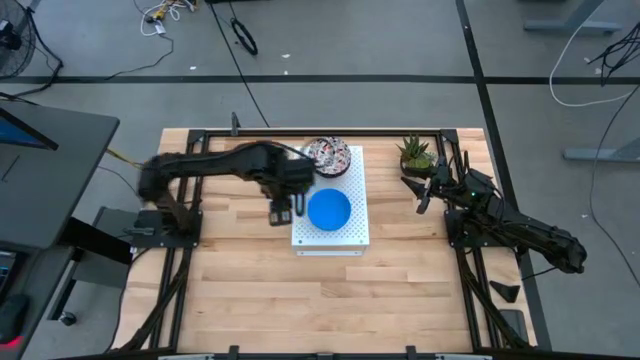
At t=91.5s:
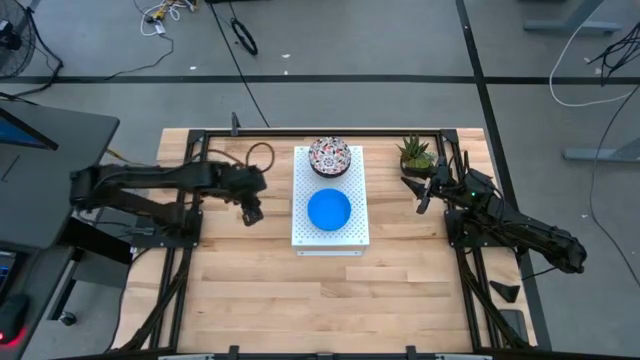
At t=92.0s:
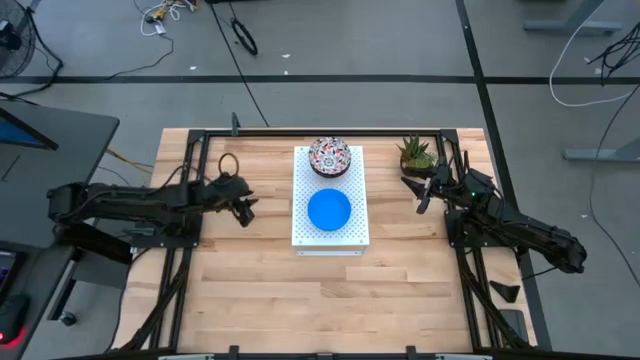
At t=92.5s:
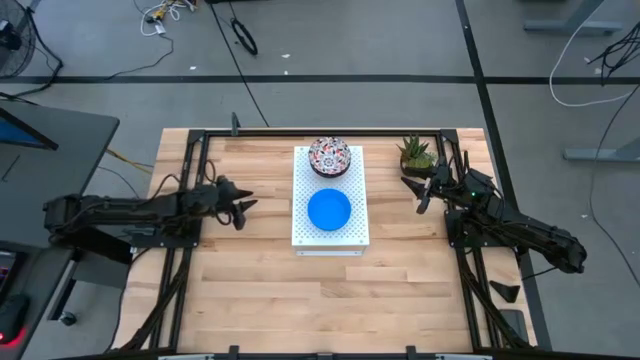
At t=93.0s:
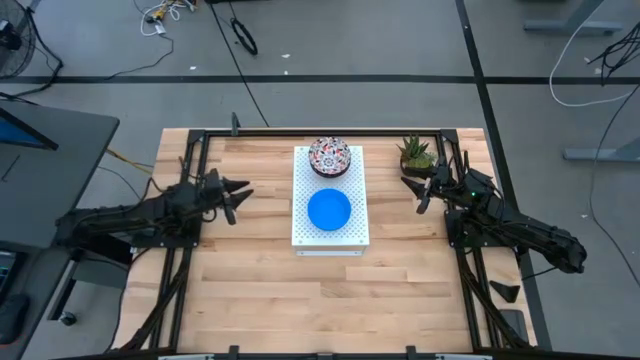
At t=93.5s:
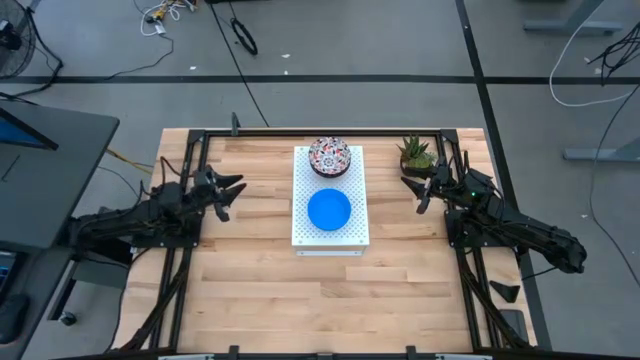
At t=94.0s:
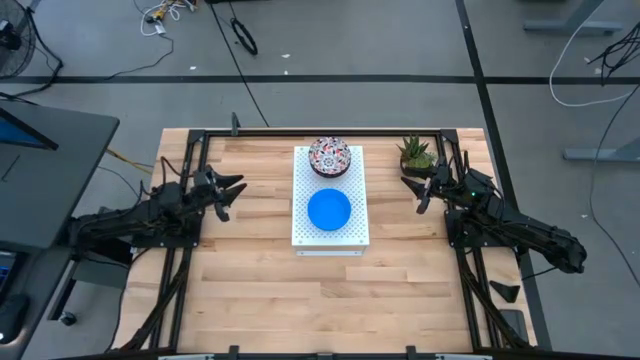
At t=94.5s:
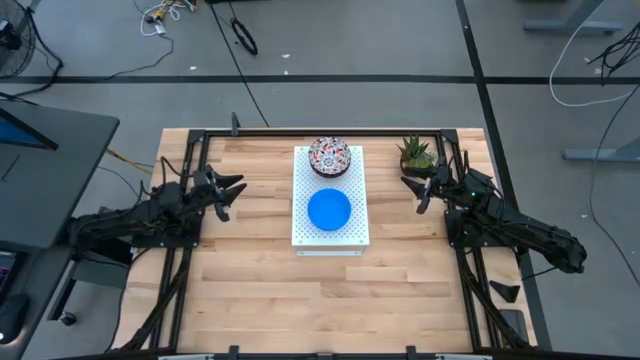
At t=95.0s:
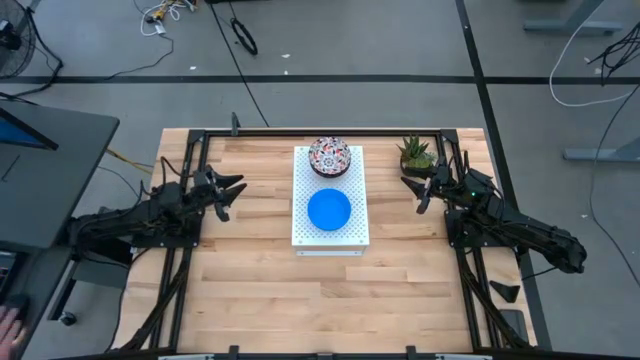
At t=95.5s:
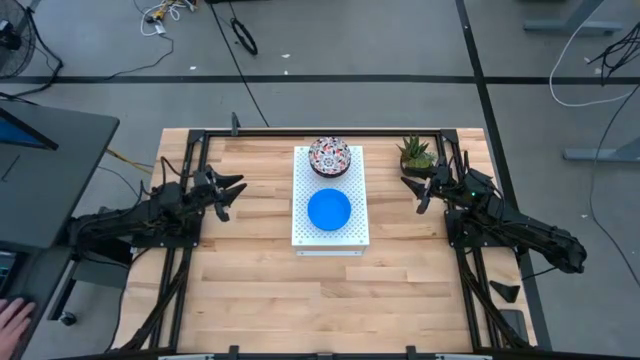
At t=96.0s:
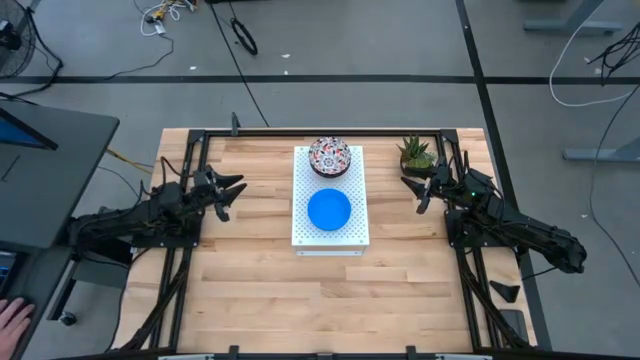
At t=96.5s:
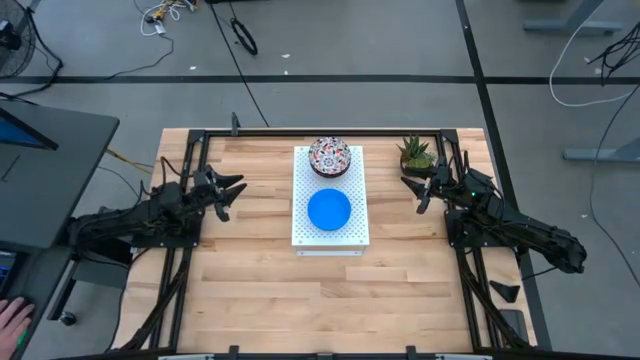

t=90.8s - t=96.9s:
Task: Pick & Place Mini bowls
Return to Home Position

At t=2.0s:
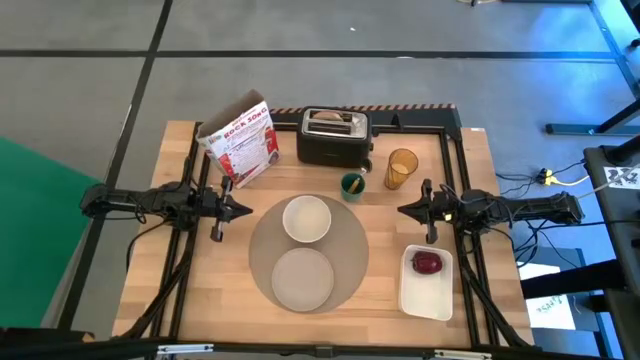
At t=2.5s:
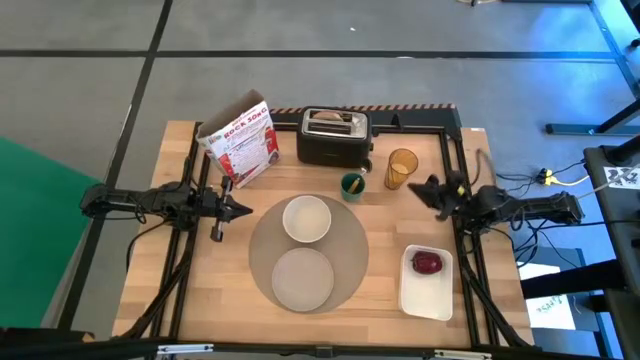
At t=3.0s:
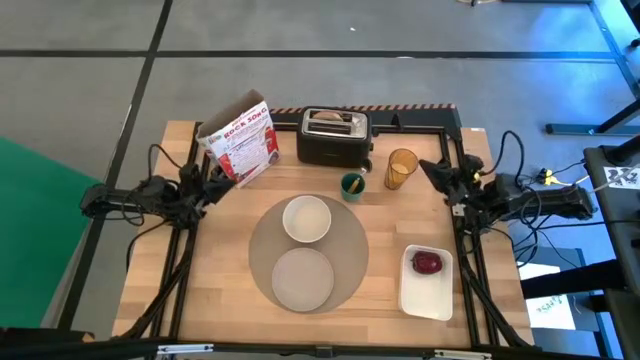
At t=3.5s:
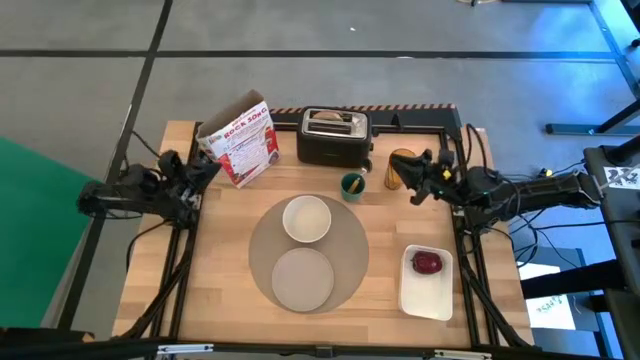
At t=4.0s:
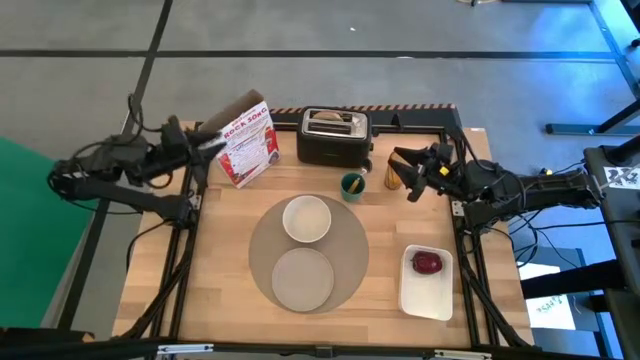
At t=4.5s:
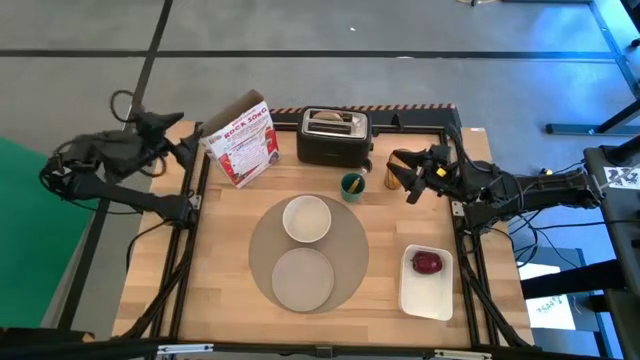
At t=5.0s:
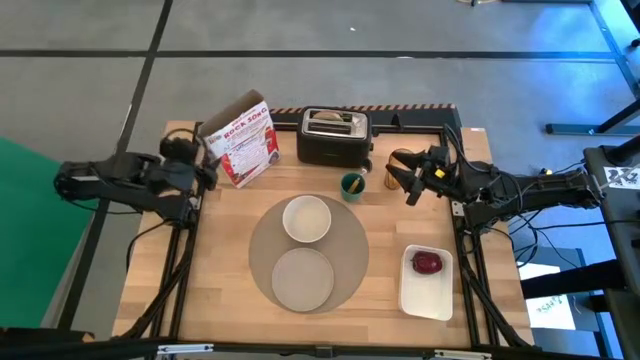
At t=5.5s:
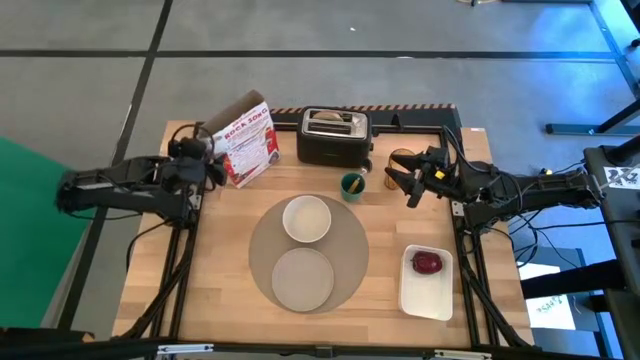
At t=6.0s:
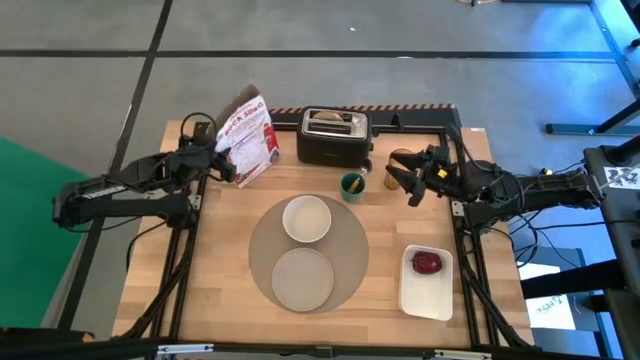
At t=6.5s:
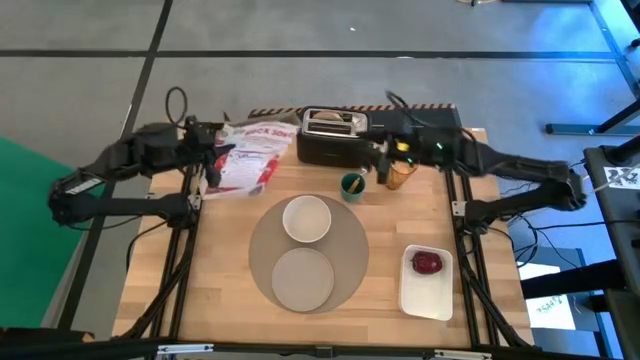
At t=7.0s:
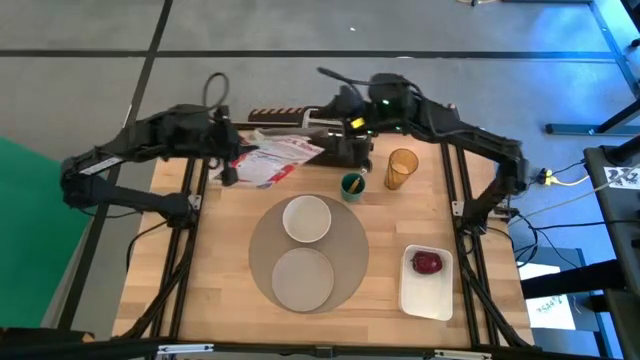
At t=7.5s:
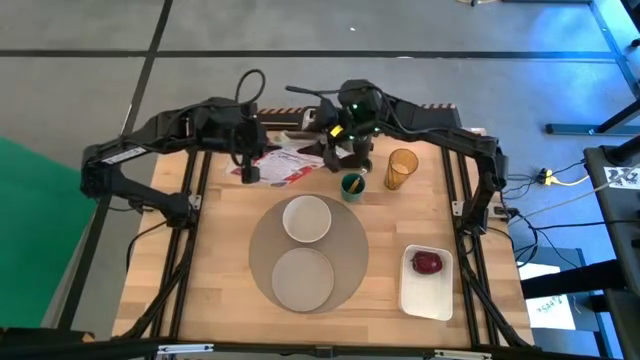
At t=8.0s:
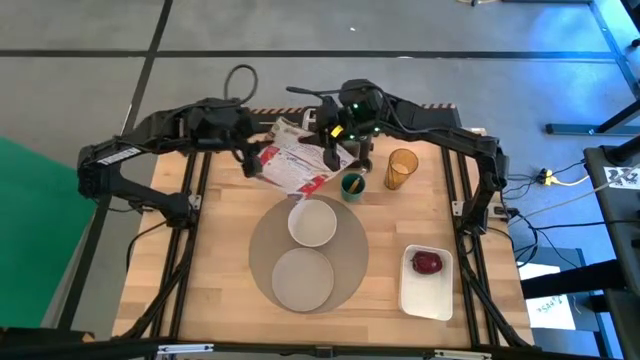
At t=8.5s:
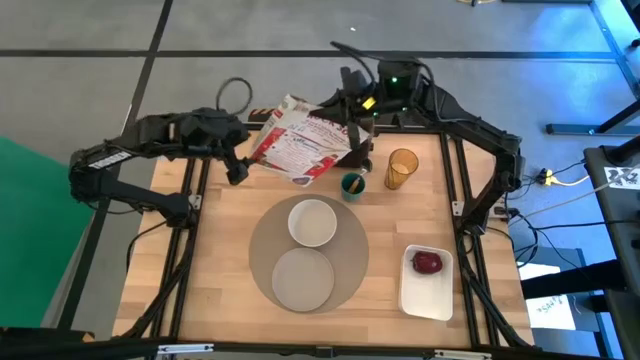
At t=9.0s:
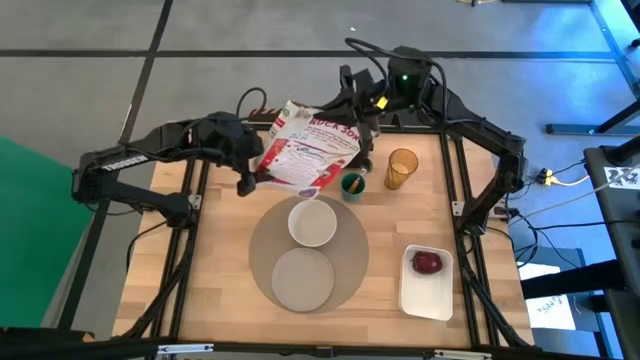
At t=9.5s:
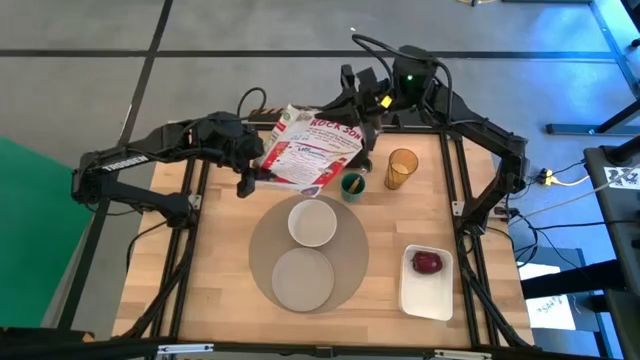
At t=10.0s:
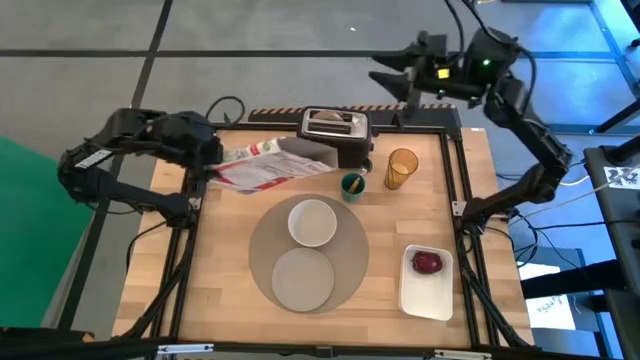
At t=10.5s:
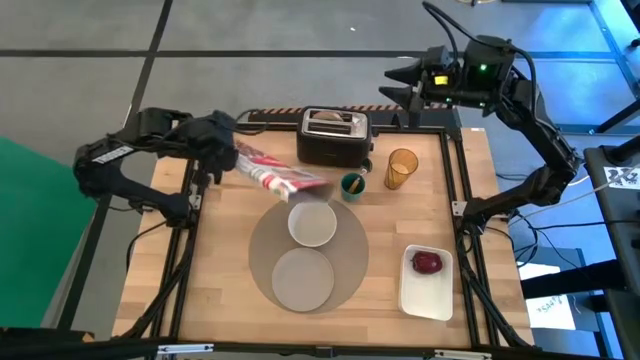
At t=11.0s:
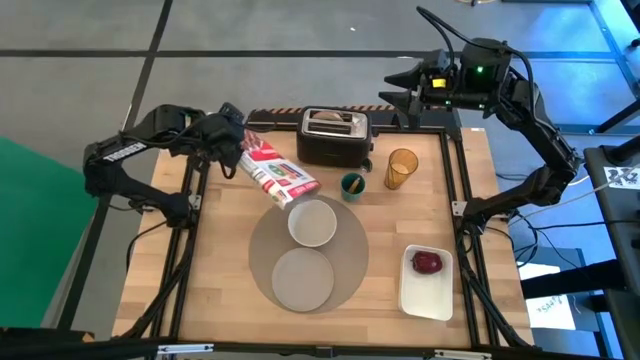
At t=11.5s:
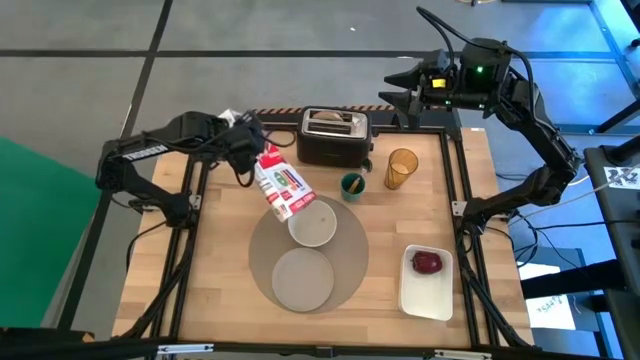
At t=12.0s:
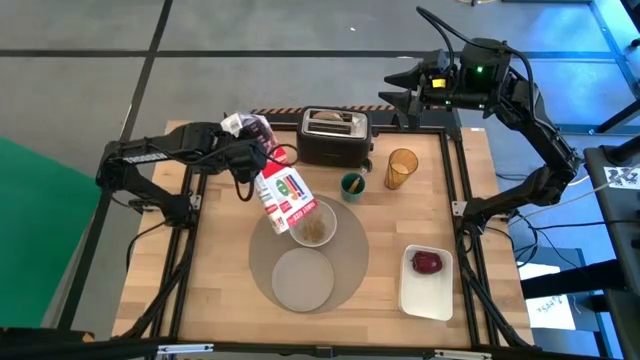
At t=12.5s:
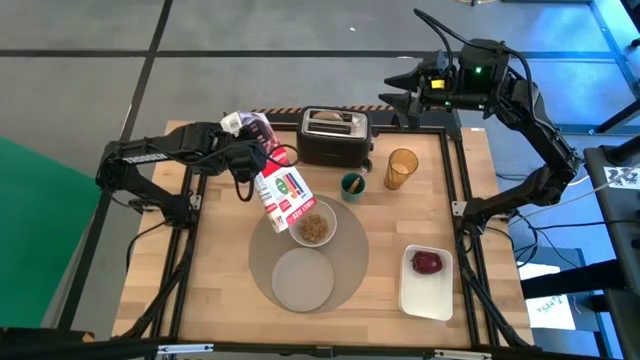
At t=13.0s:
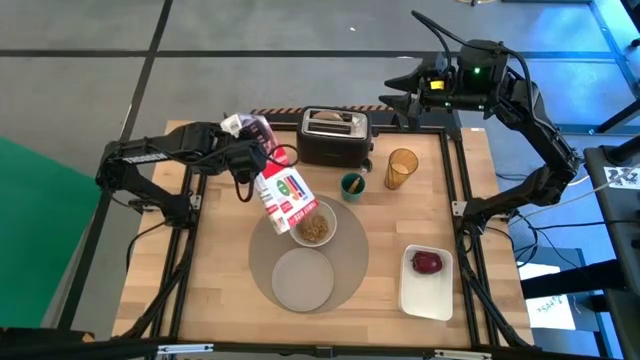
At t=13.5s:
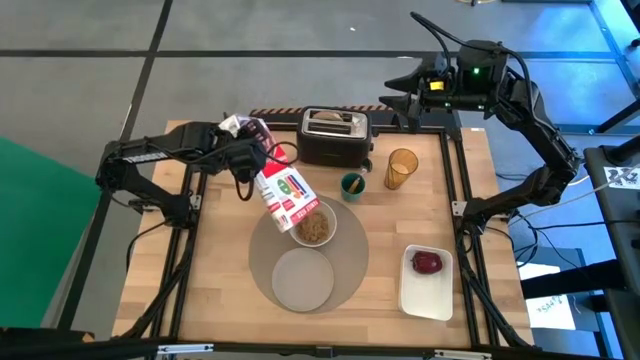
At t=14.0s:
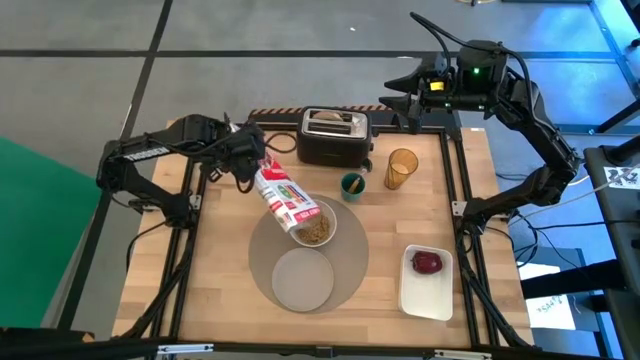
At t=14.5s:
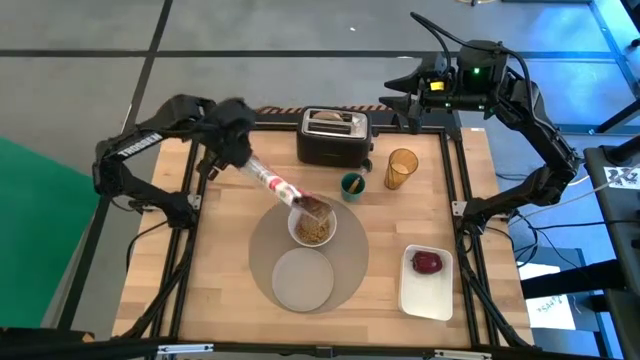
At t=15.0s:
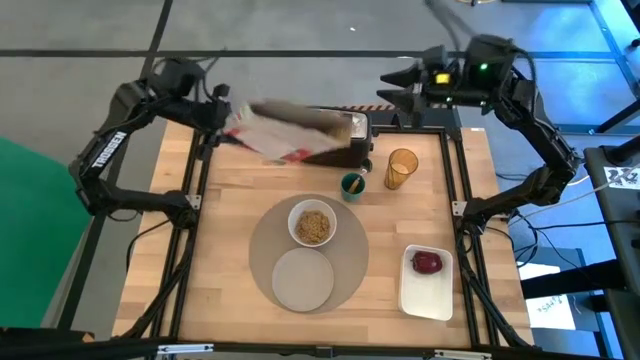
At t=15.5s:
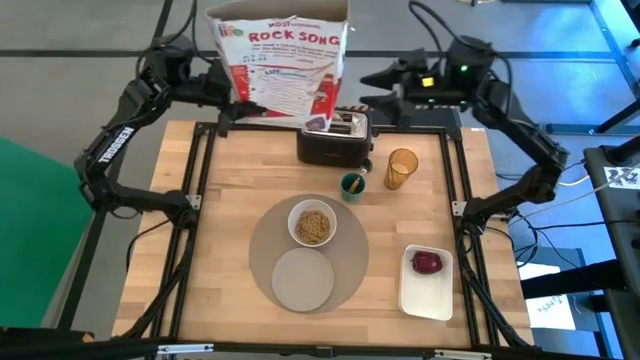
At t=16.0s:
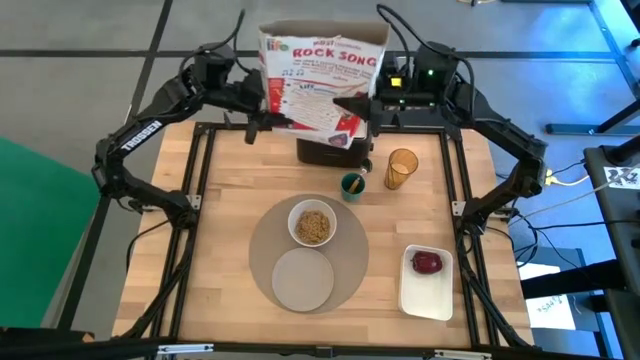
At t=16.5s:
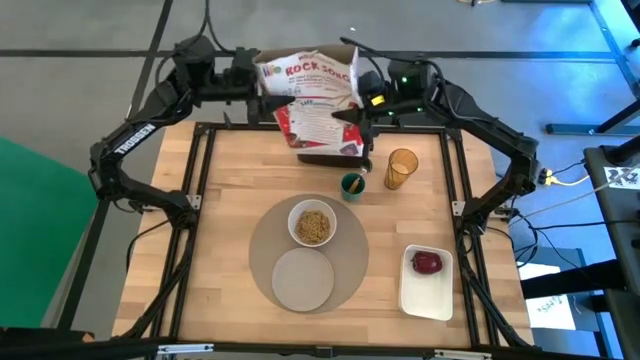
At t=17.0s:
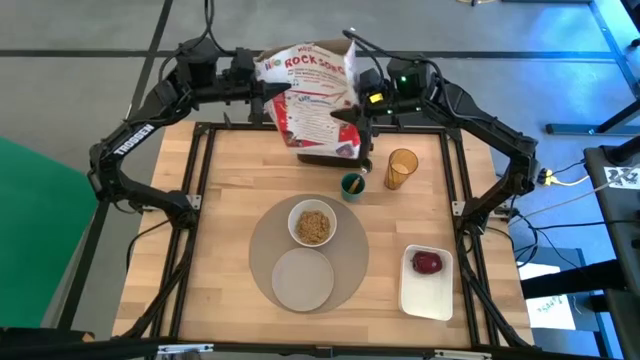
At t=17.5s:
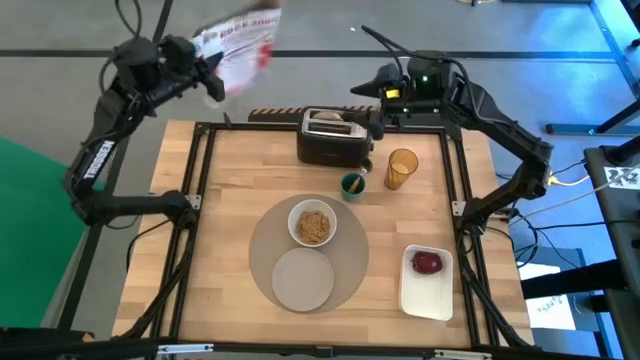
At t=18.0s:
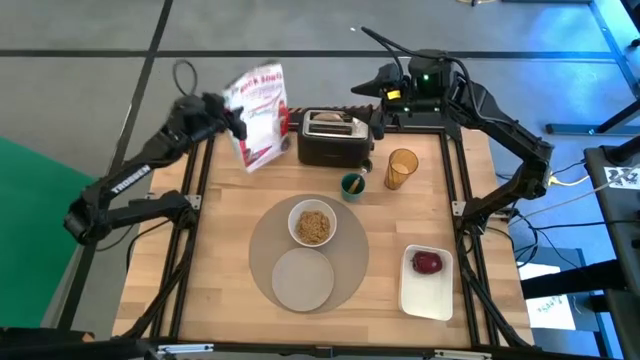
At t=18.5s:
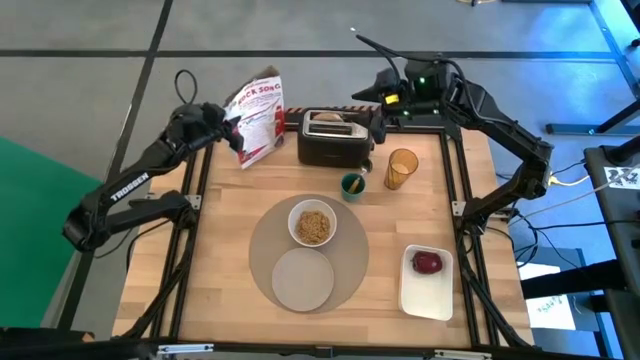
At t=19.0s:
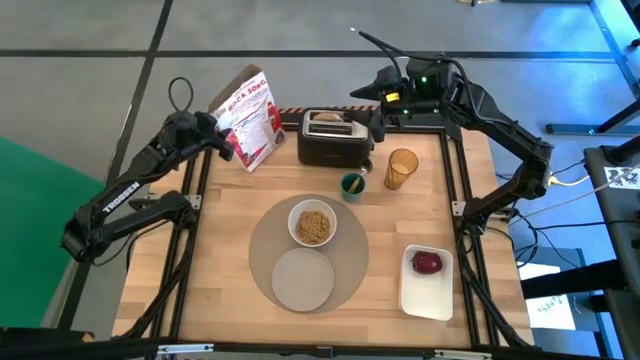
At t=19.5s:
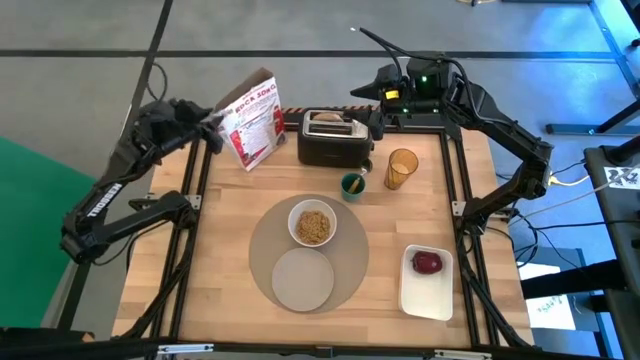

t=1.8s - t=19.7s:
Task: Arrange a breakfast setting
Pour the cereal from the cereal box into the white bowl
